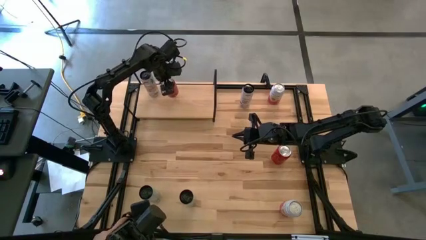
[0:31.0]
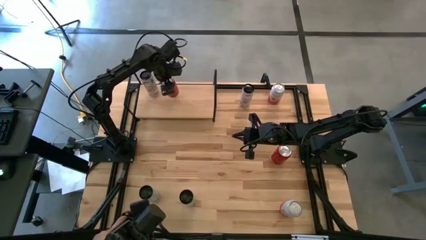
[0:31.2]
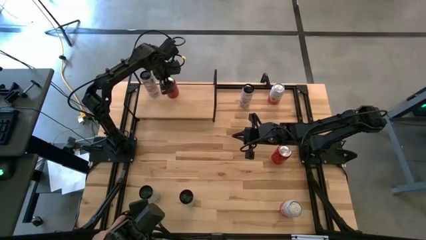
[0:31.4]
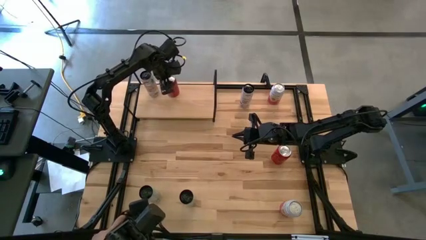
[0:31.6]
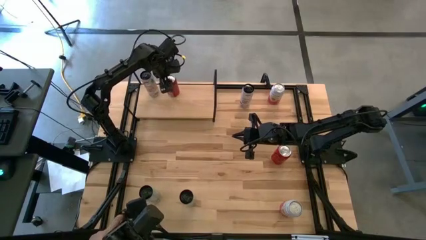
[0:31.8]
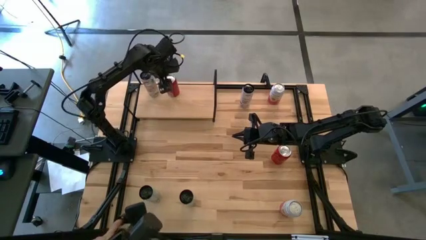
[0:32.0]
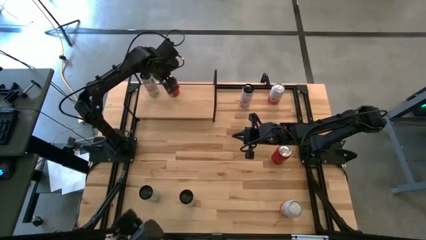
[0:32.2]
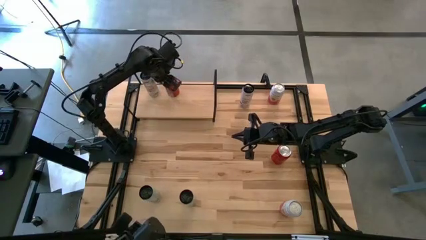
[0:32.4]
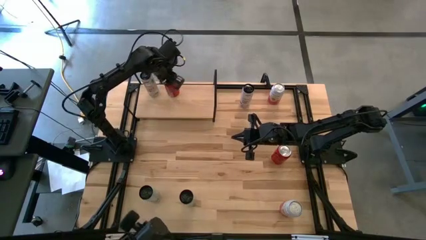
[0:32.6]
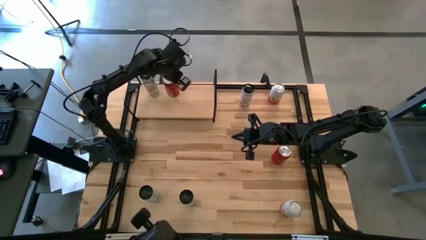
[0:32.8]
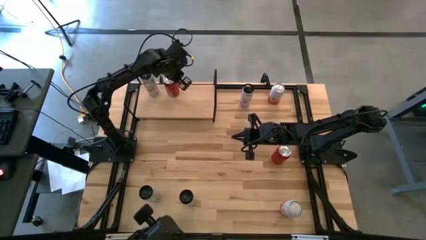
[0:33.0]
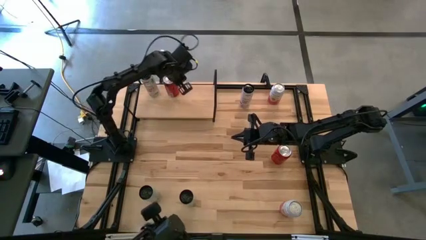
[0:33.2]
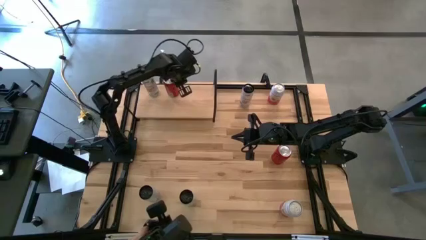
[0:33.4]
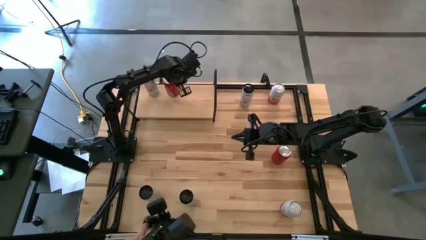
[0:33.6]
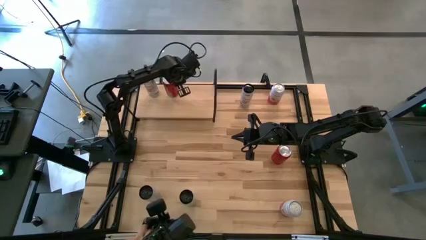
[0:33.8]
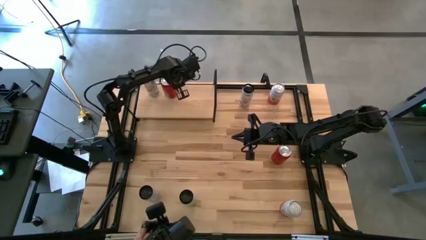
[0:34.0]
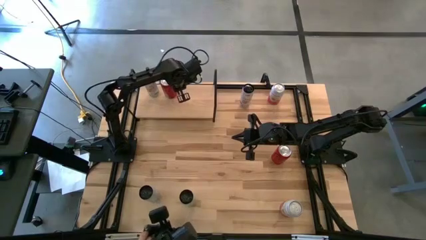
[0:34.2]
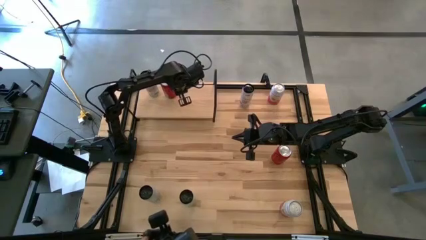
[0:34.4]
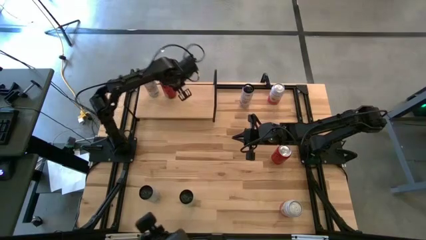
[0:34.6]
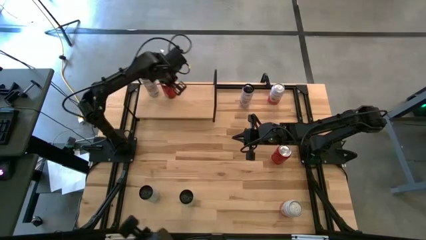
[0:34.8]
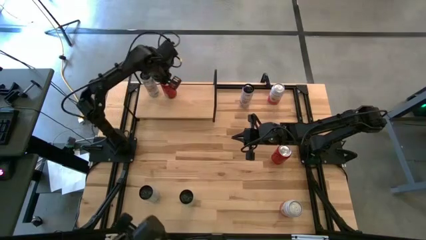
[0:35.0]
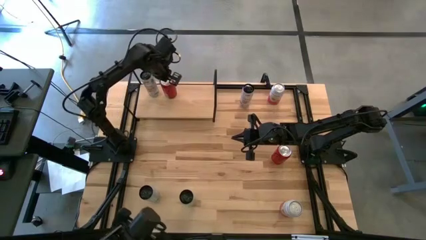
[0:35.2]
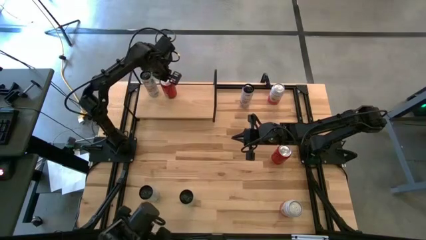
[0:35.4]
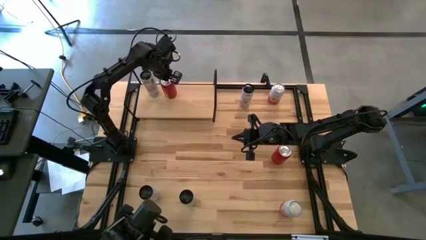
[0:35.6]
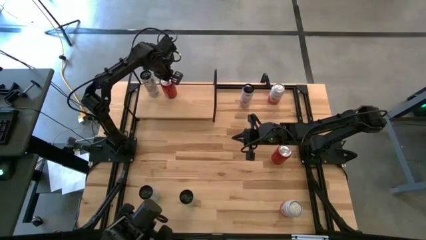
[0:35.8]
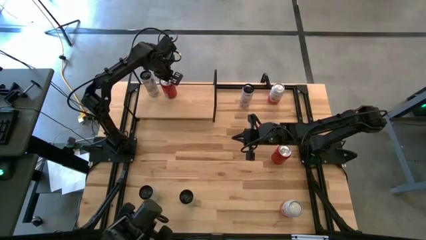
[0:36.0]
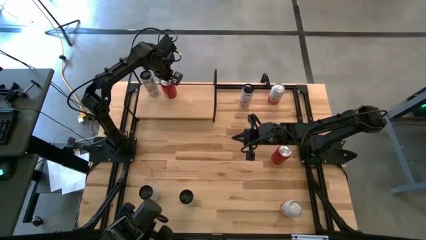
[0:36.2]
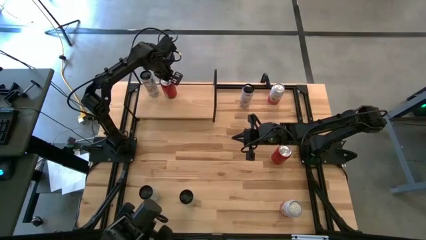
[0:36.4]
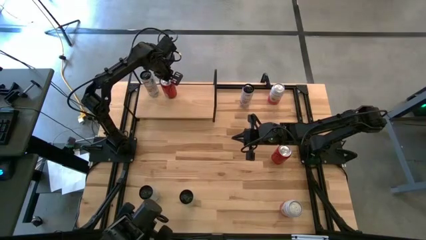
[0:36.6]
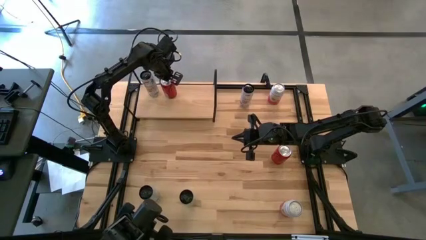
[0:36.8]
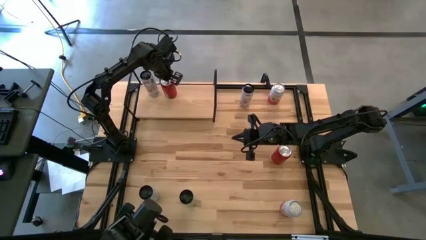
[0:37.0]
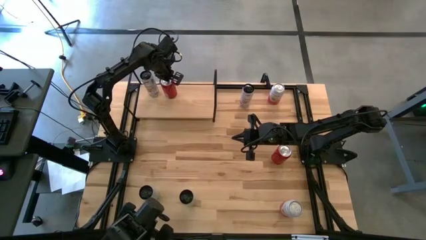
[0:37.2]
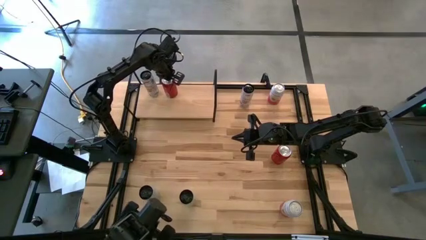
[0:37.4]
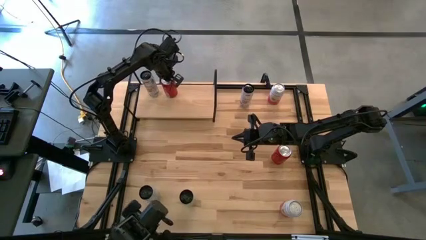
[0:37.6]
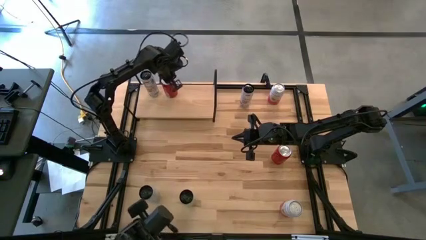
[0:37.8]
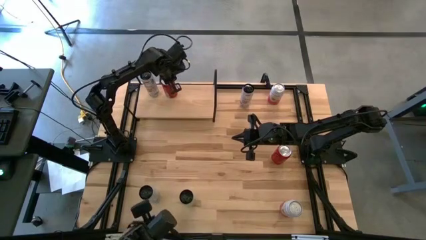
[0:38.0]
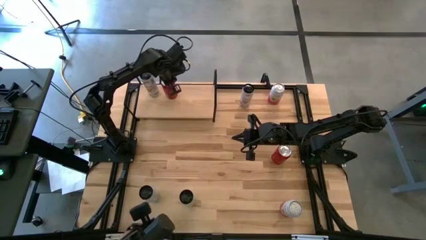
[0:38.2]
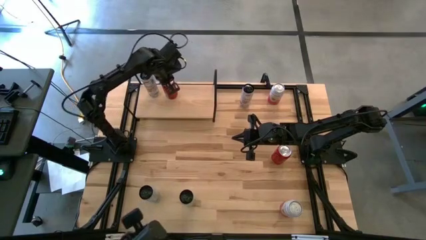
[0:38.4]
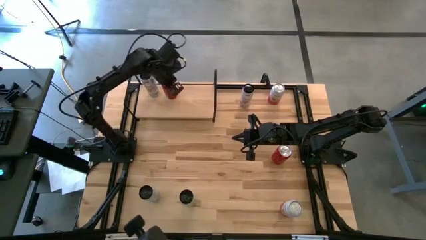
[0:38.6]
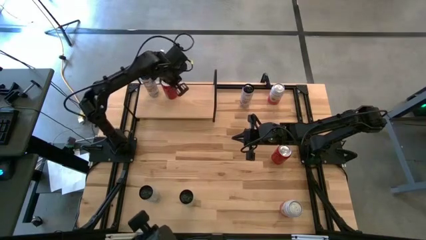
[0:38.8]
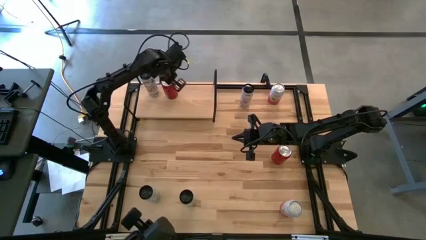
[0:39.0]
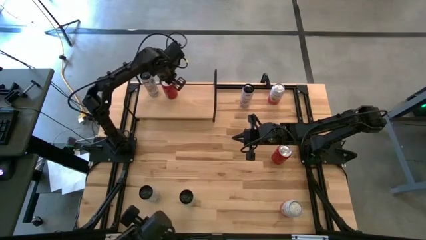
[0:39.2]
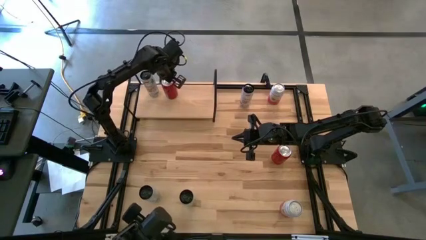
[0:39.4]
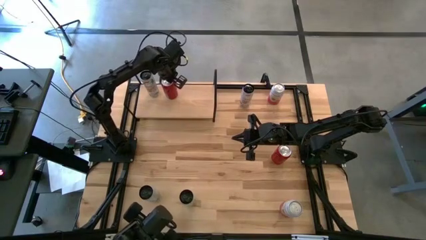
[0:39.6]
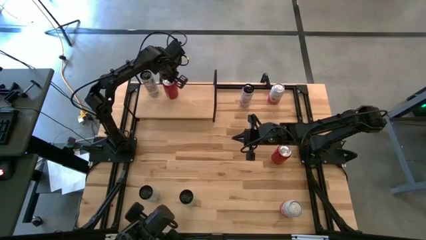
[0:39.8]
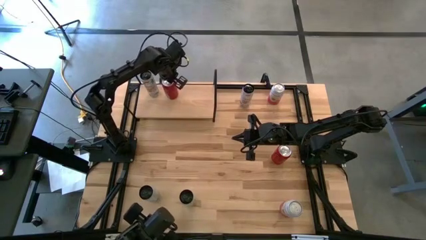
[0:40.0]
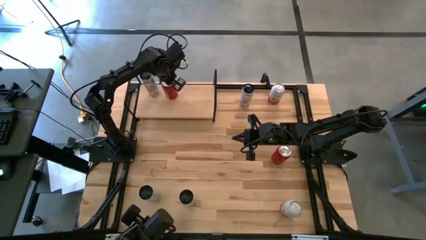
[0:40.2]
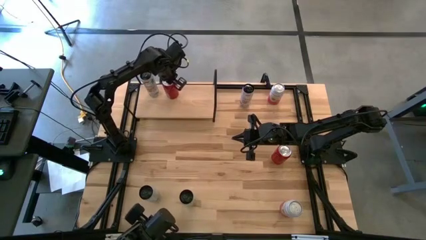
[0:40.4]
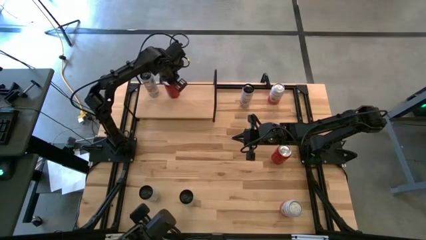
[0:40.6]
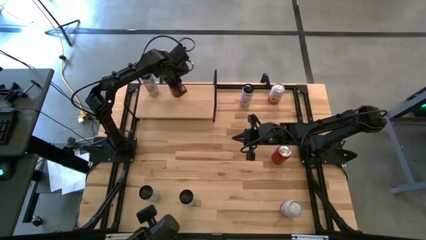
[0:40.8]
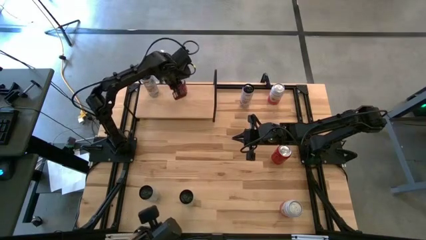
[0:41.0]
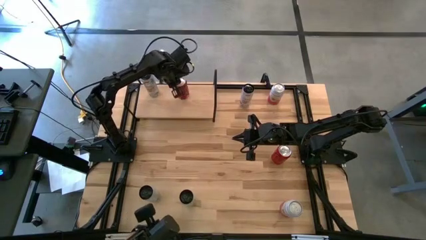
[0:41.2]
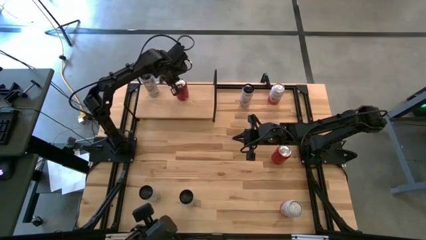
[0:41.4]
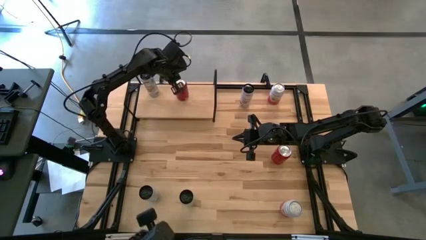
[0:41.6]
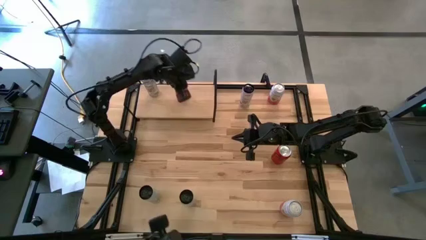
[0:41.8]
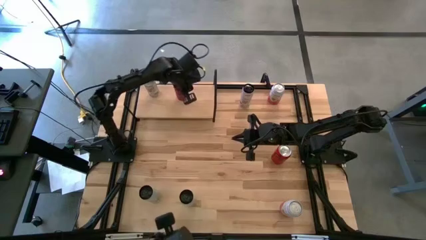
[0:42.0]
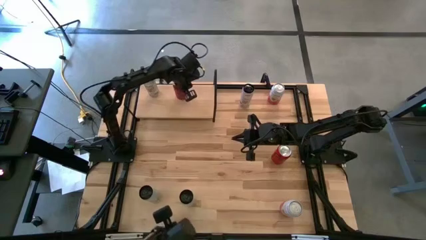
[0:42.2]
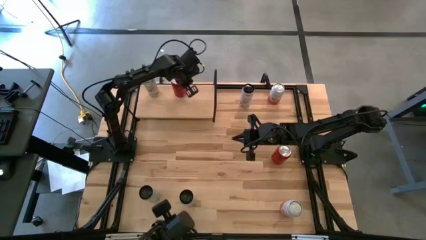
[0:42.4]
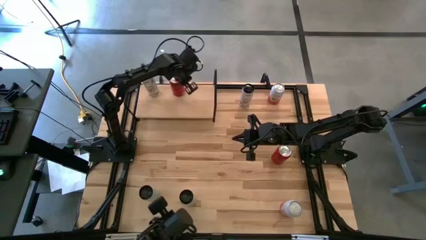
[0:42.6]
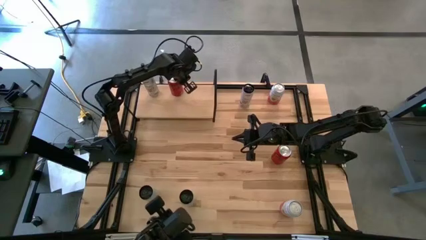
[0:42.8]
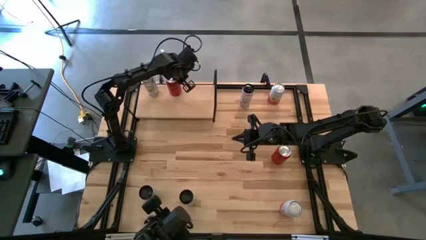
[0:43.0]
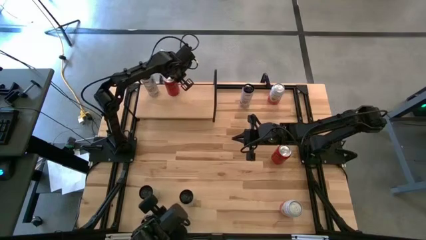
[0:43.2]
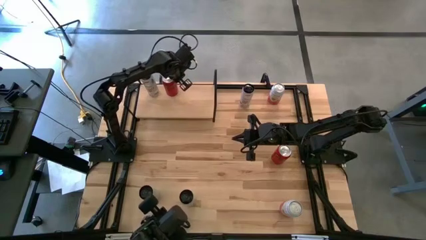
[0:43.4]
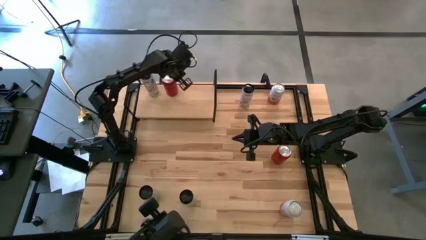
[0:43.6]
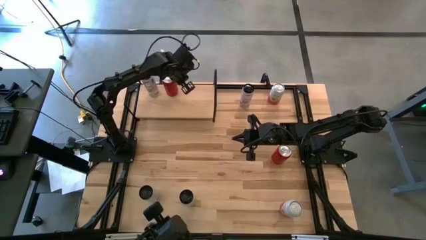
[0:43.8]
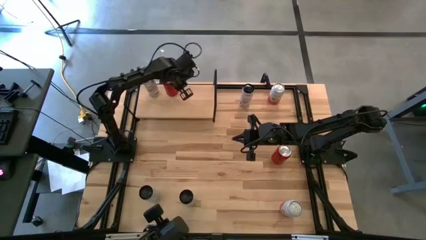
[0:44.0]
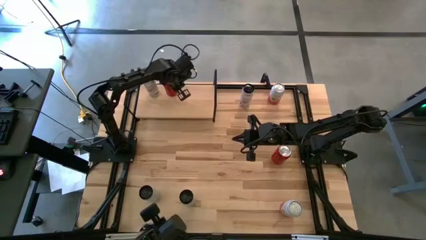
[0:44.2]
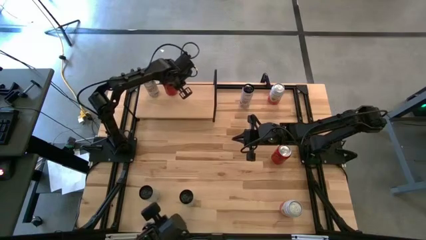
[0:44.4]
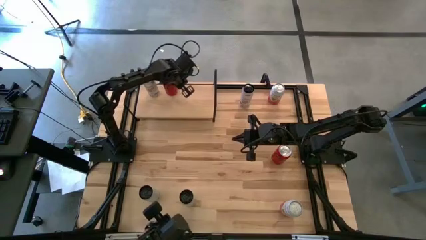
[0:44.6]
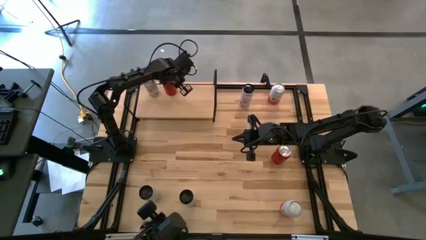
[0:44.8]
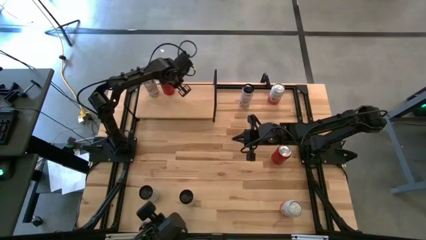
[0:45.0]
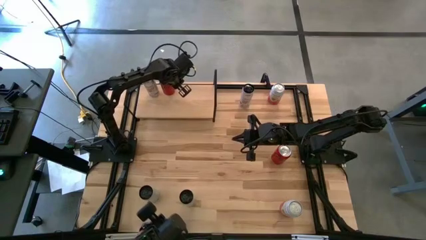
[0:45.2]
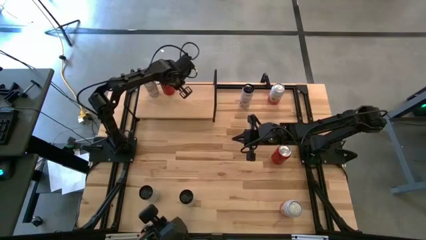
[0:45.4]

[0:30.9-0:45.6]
Task: Place canned beverage on shelf
Put the left red-black soda can on the shelf
